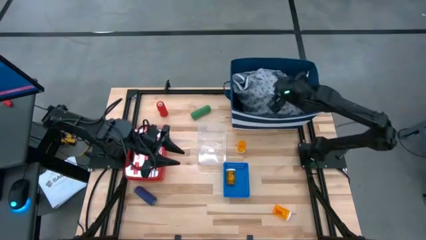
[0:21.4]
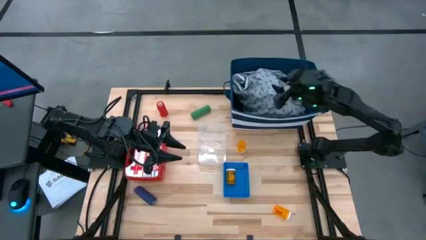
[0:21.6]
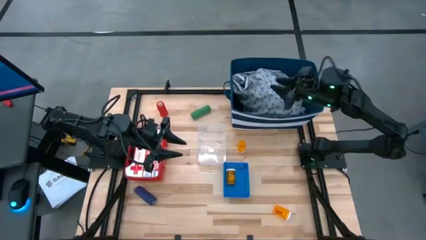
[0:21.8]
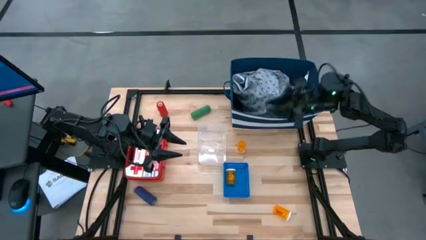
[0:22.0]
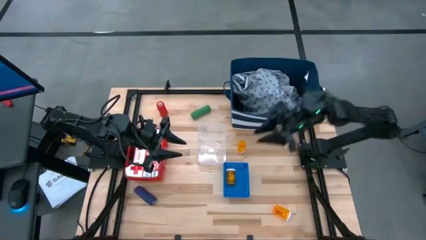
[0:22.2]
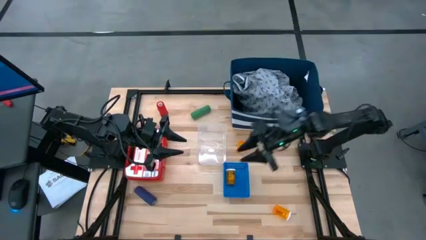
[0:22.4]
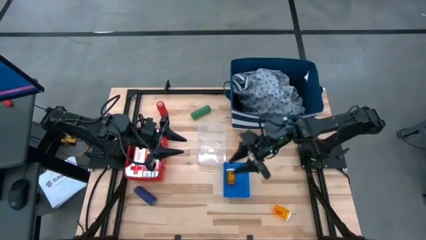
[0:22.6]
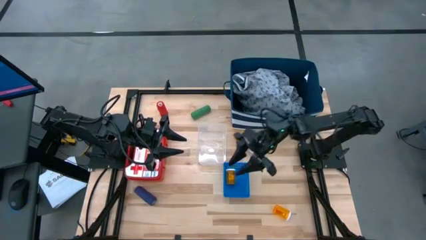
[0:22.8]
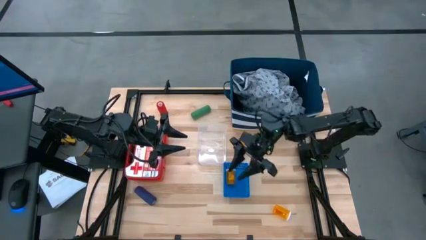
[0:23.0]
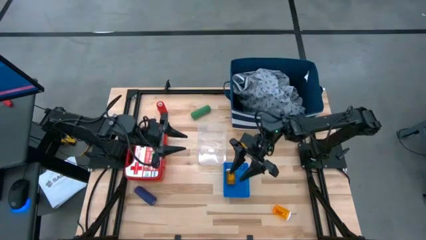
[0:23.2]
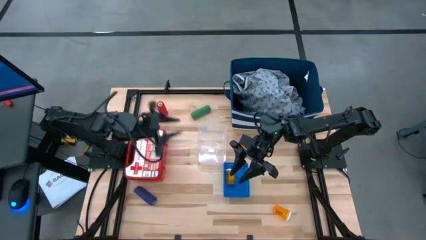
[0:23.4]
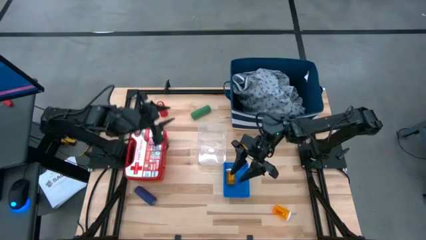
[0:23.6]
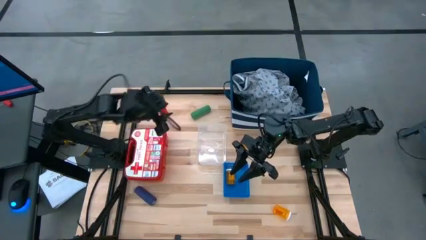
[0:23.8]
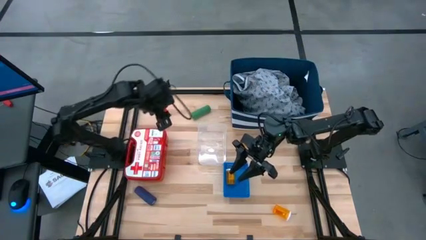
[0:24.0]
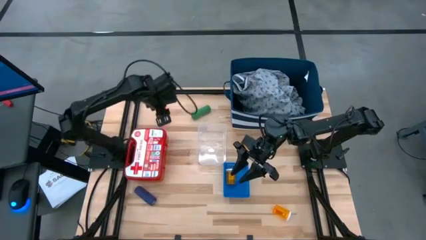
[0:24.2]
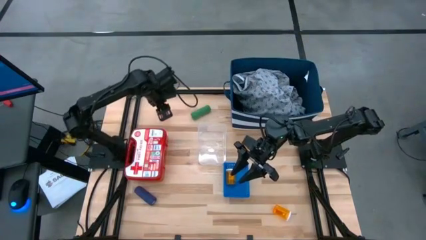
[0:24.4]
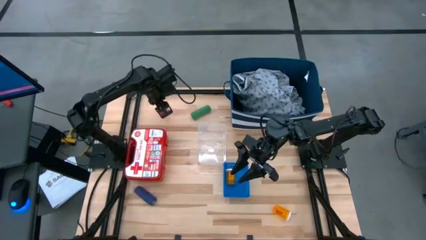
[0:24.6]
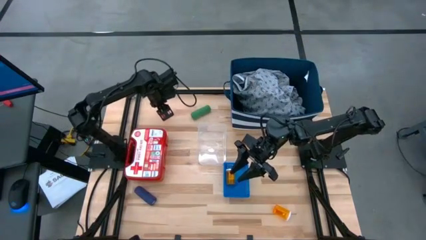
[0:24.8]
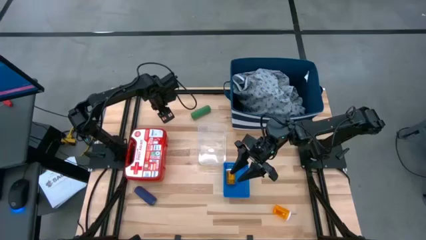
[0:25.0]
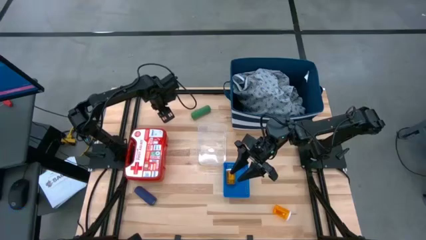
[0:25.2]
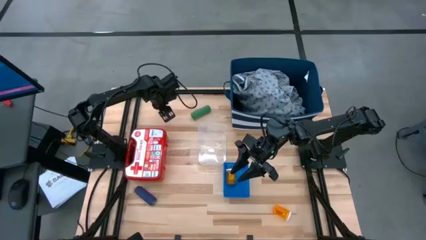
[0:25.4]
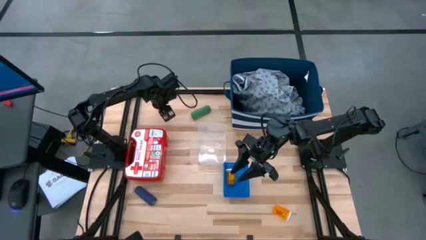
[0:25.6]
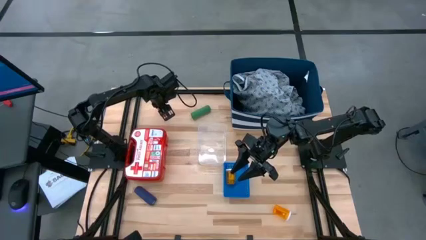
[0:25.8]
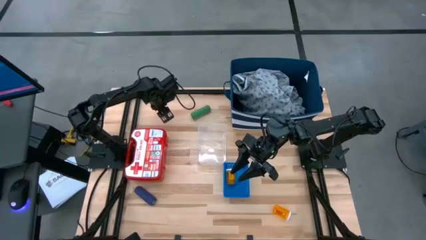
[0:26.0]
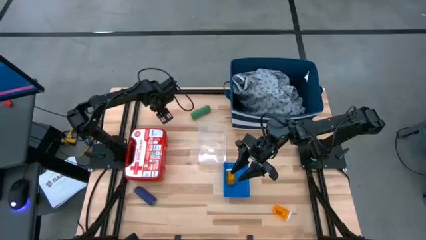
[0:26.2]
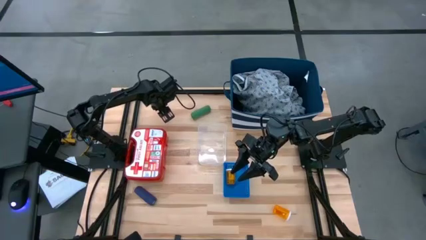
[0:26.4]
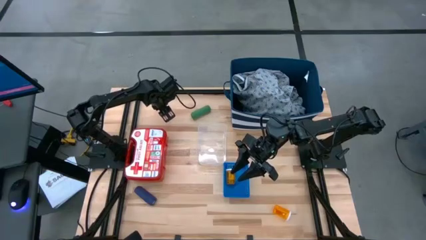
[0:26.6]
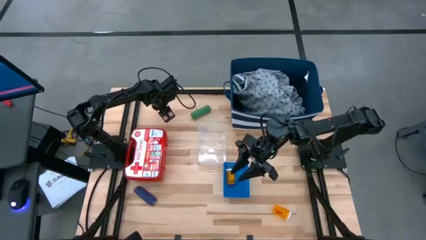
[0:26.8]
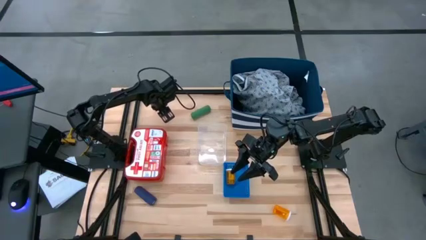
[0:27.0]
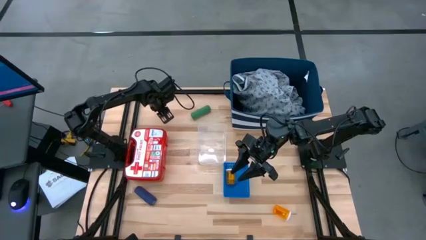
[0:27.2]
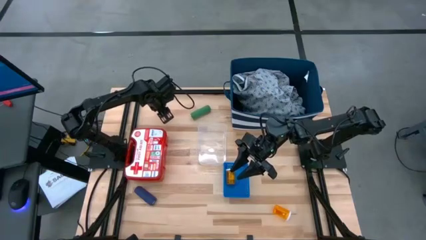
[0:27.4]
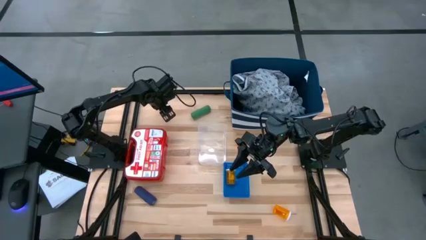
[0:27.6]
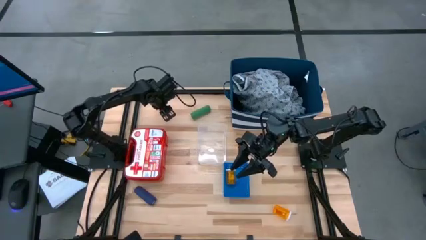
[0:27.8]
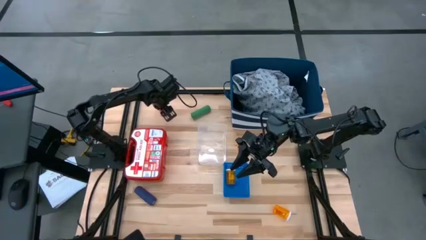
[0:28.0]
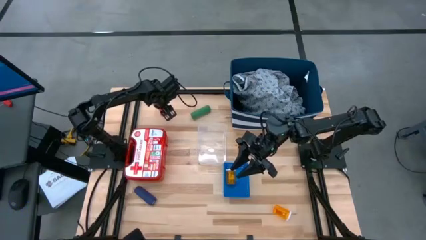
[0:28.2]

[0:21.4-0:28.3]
Task: Pick & Place Medicine items
Put the red bandage into the white transparent bin

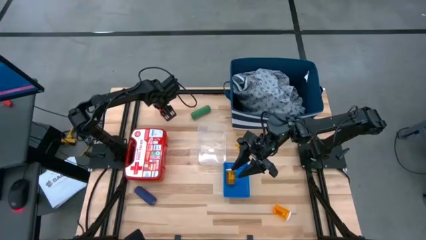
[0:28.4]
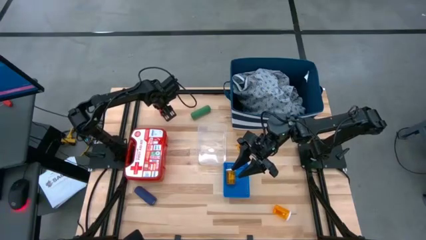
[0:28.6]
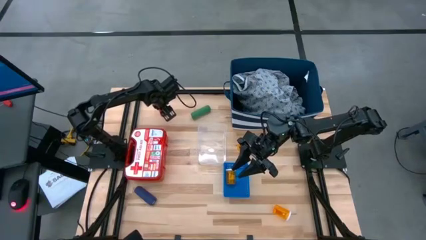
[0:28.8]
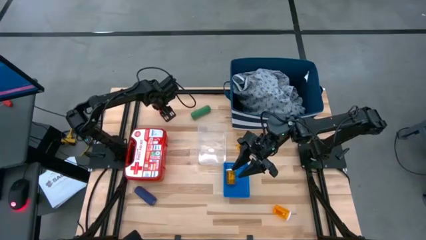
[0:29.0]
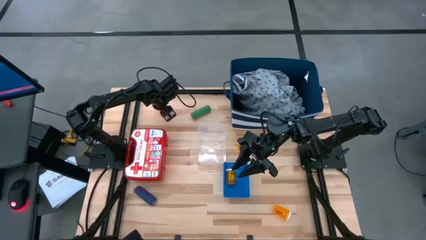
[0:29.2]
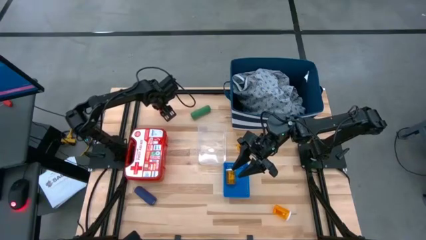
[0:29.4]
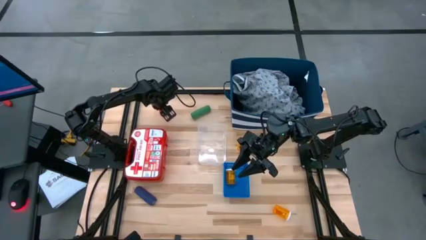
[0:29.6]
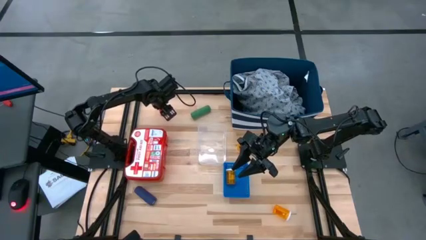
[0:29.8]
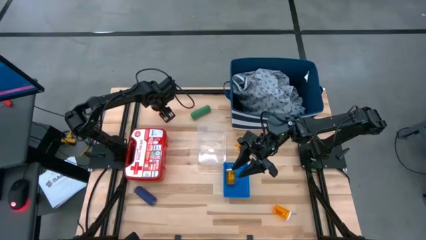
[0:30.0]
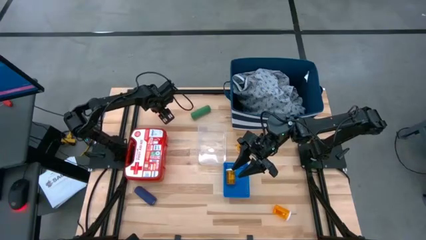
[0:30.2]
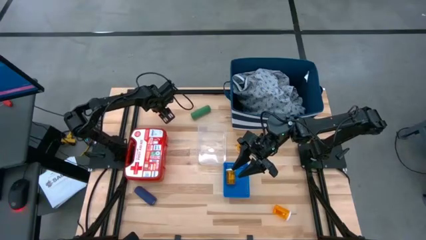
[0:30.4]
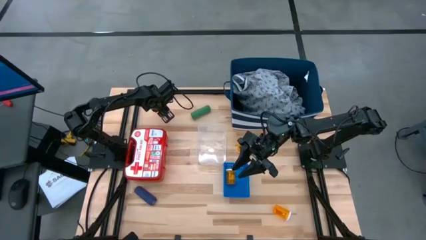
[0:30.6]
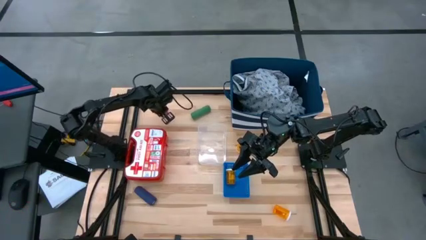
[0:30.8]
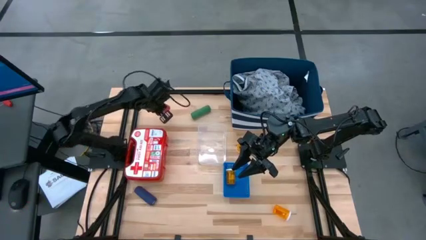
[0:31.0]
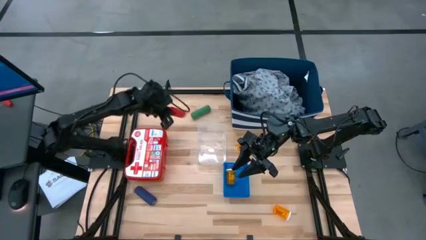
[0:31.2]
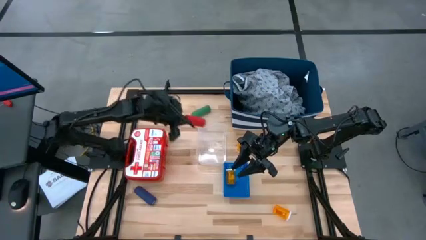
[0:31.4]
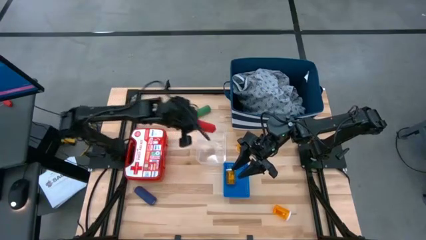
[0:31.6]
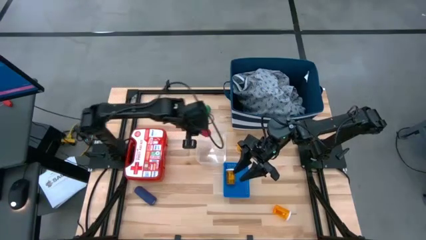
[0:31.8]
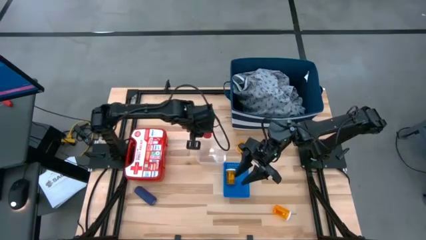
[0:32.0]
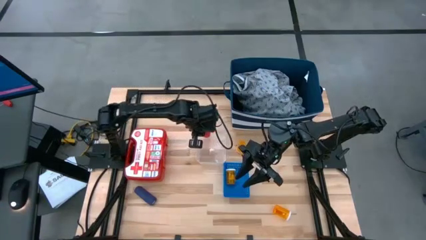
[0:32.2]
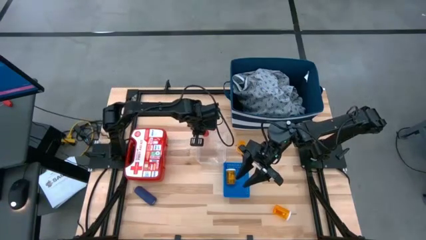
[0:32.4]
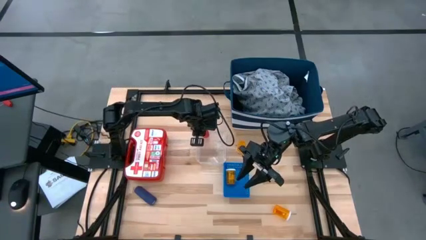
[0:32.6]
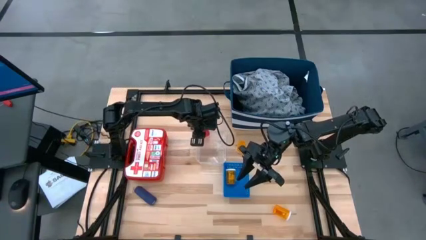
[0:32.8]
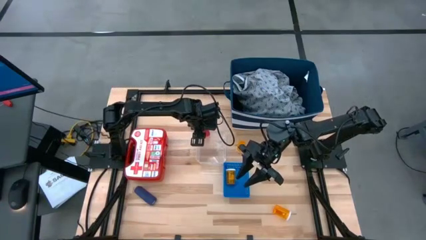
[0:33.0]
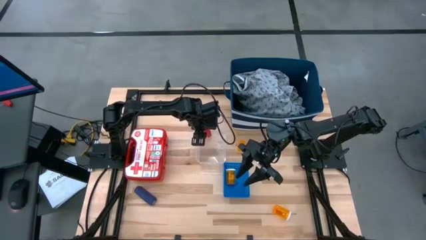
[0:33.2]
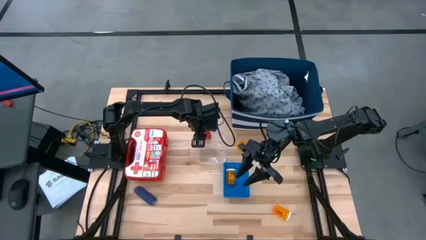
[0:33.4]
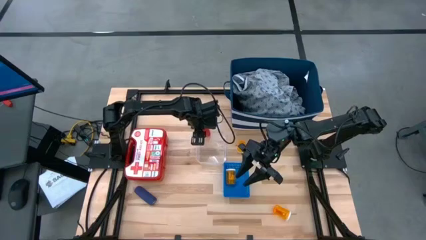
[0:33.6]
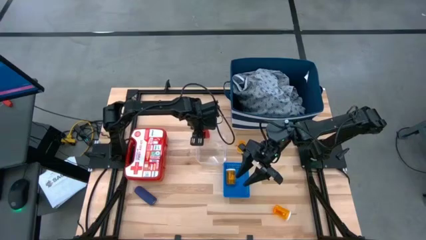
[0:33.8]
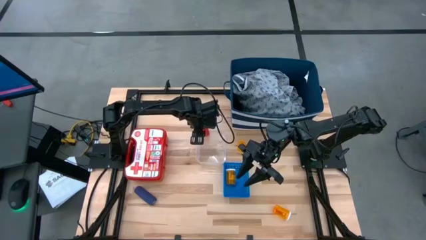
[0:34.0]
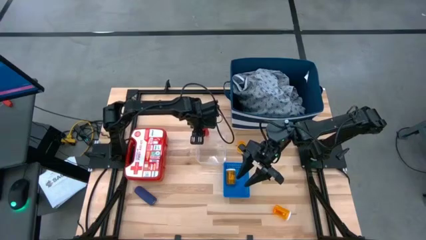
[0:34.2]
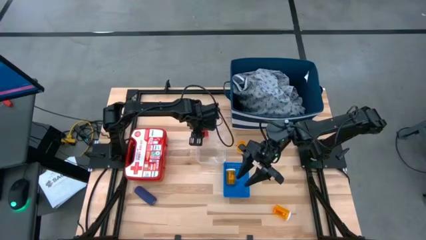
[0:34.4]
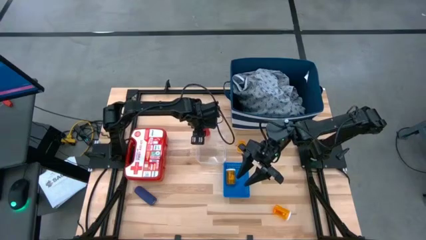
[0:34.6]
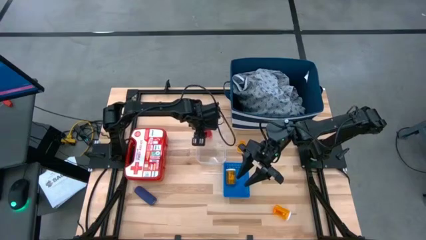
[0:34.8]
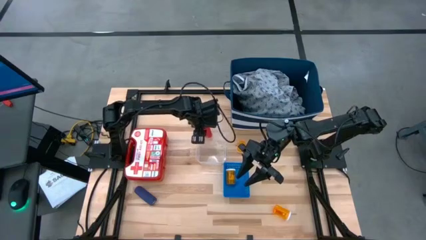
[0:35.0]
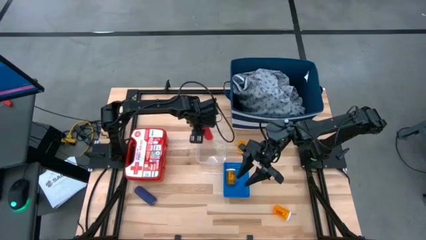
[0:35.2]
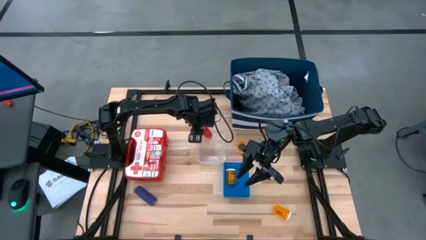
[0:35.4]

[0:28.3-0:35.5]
Put the red bandage into the white transparent bin

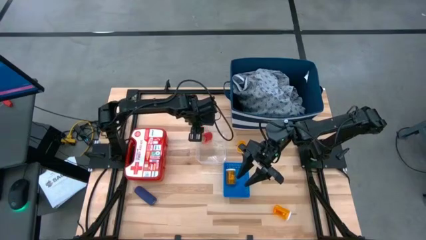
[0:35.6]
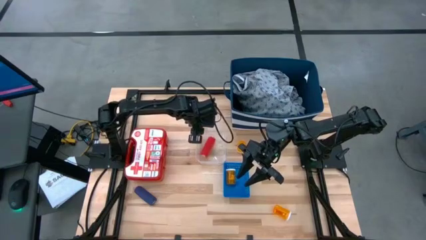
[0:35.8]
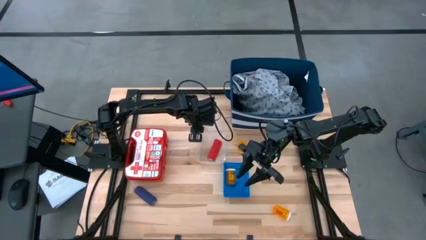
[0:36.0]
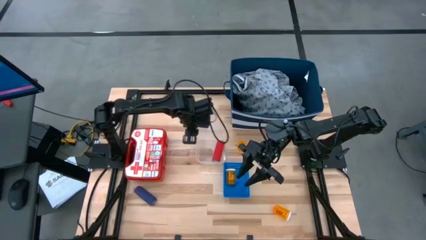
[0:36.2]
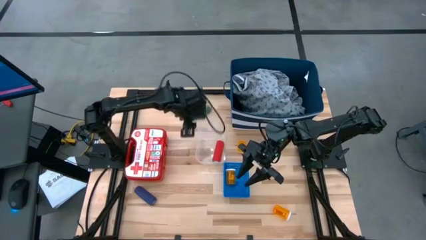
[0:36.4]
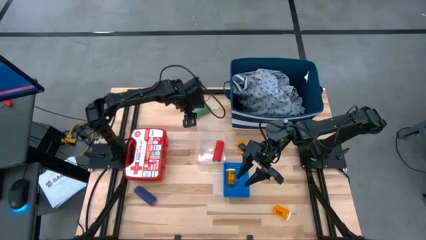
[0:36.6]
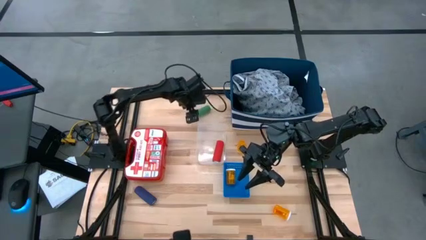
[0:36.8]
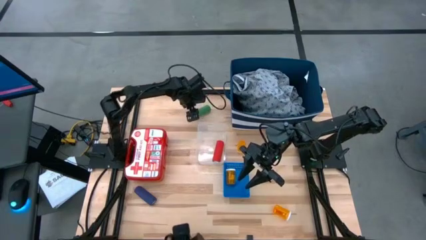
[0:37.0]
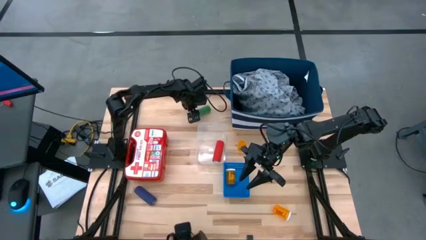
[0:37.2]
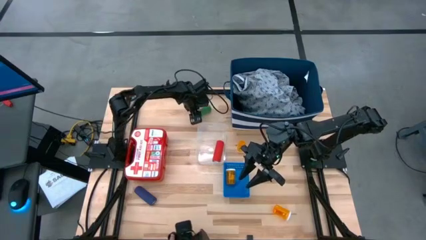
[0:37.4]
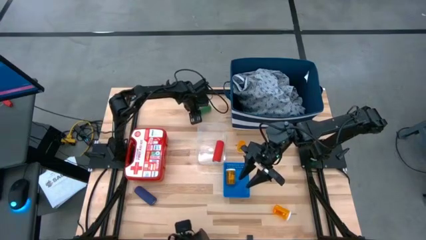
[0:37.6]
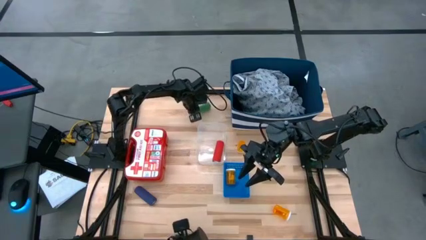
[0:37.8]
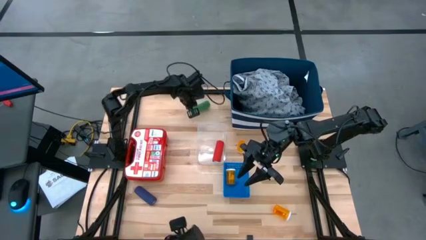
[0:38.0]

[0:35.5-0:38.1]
Put the green bandage into the white transparent bin
